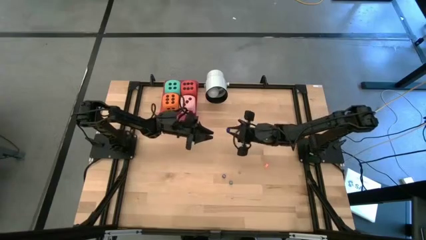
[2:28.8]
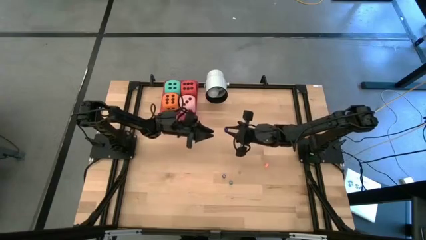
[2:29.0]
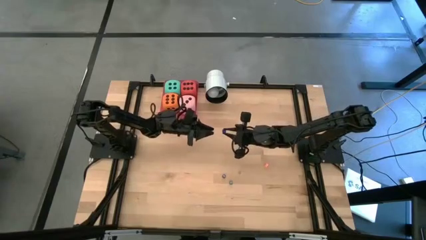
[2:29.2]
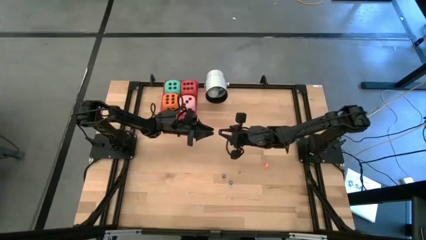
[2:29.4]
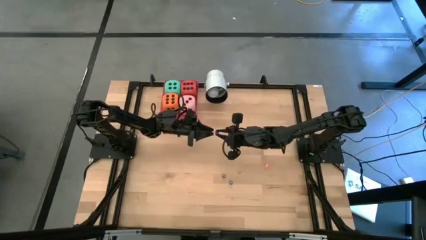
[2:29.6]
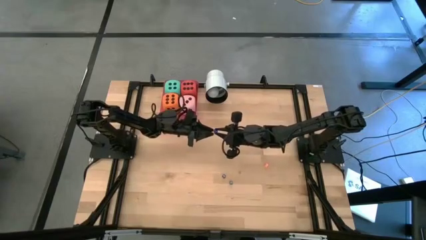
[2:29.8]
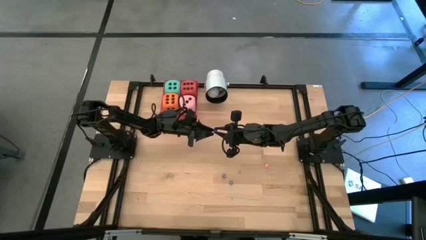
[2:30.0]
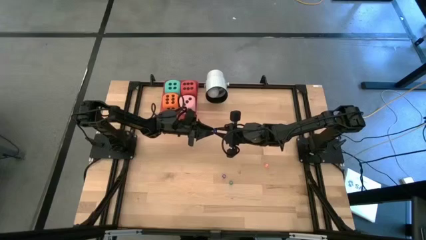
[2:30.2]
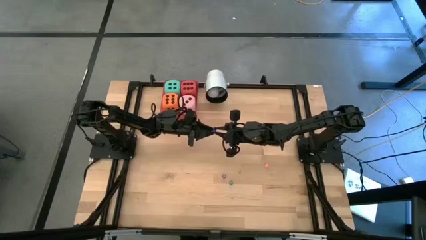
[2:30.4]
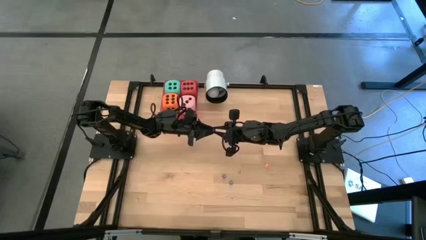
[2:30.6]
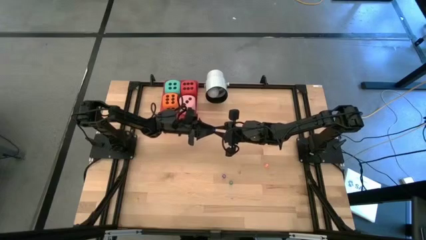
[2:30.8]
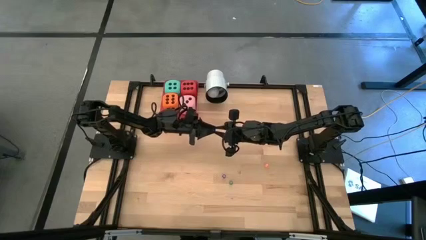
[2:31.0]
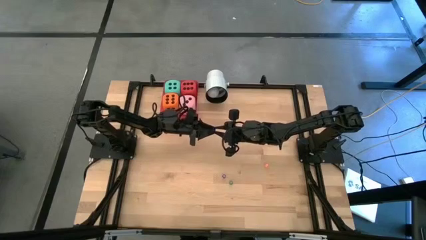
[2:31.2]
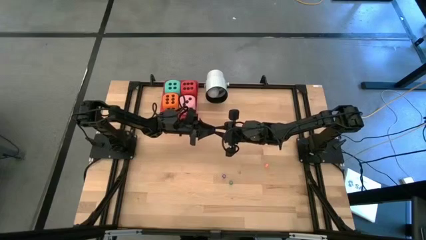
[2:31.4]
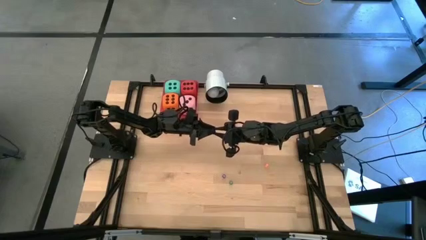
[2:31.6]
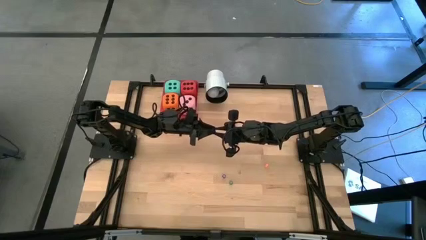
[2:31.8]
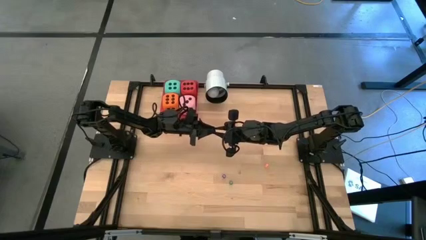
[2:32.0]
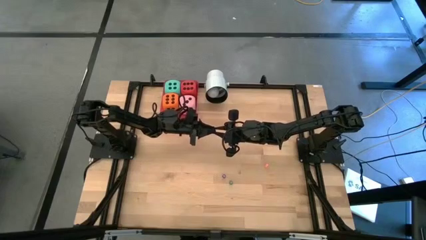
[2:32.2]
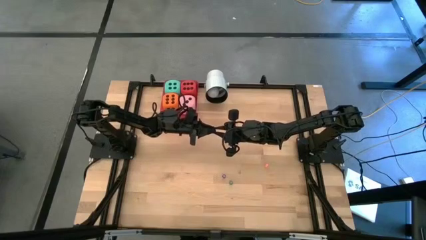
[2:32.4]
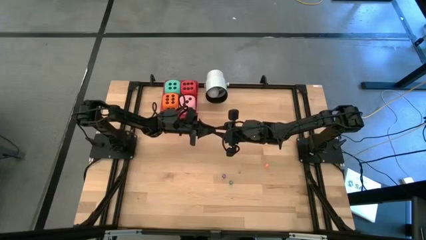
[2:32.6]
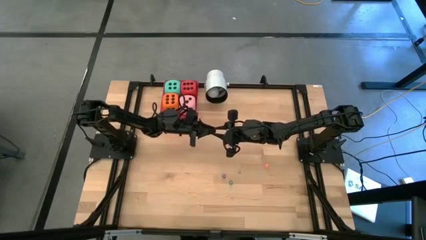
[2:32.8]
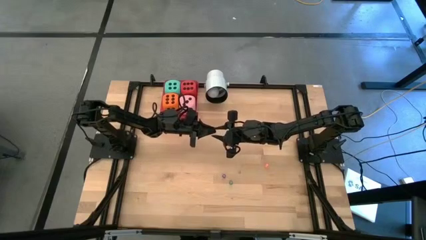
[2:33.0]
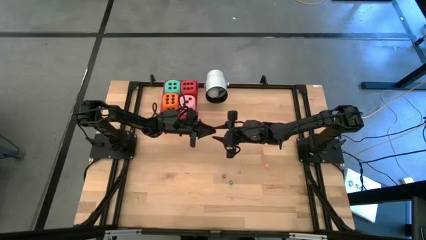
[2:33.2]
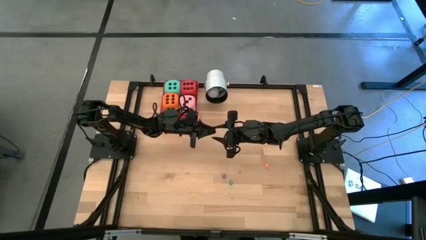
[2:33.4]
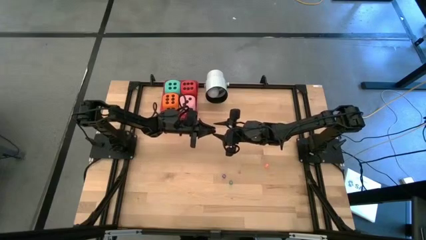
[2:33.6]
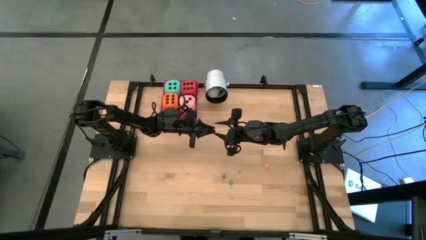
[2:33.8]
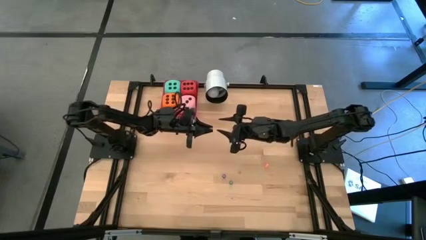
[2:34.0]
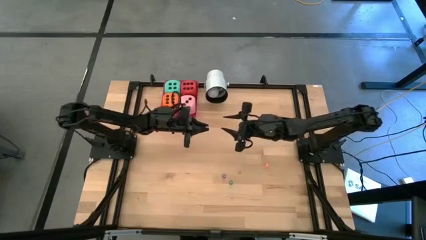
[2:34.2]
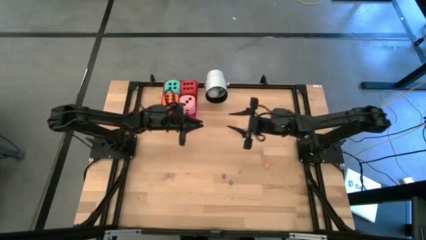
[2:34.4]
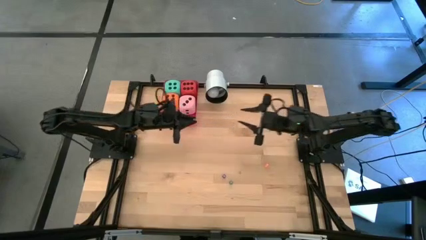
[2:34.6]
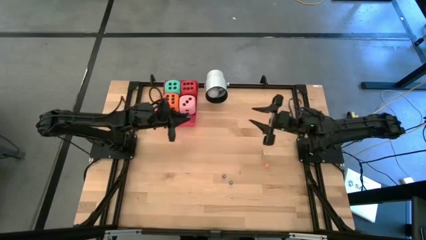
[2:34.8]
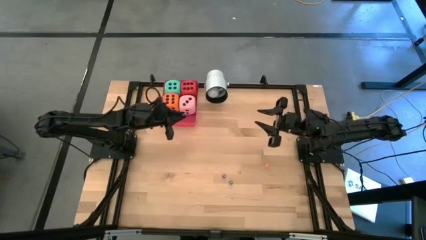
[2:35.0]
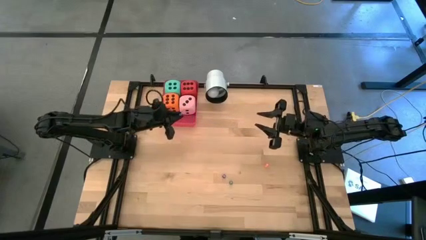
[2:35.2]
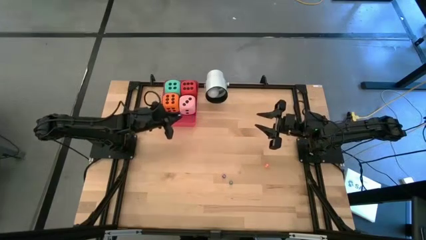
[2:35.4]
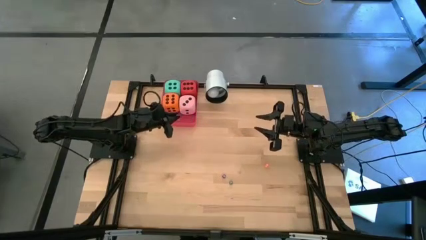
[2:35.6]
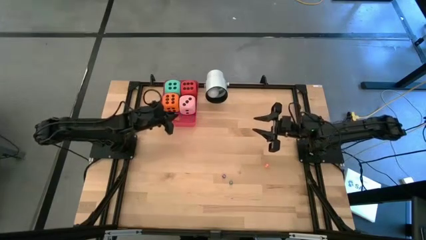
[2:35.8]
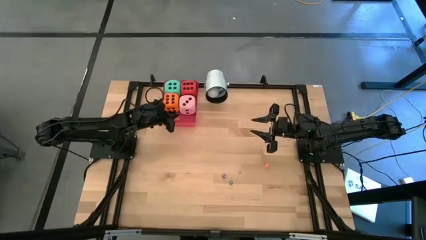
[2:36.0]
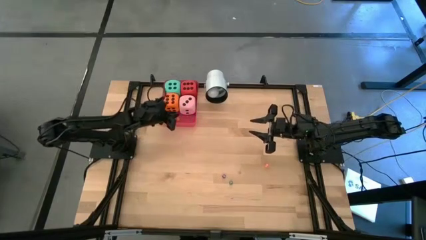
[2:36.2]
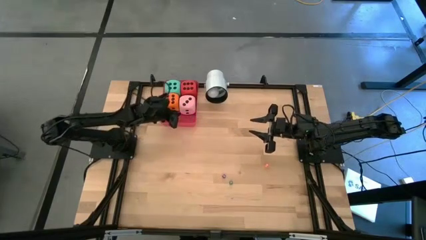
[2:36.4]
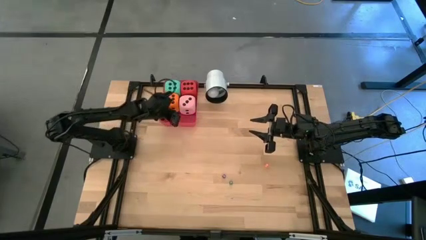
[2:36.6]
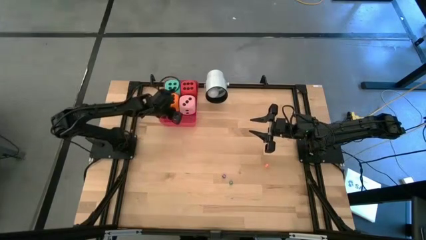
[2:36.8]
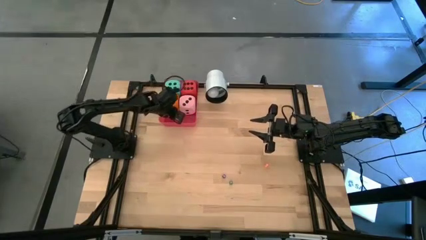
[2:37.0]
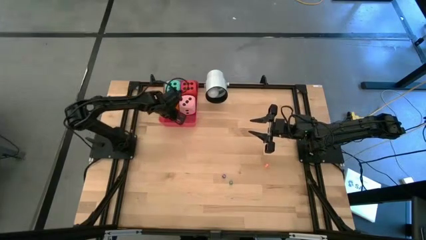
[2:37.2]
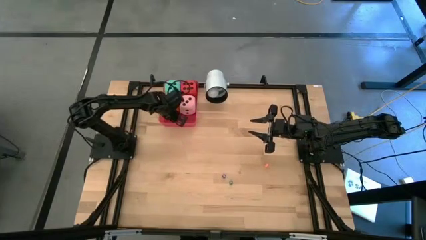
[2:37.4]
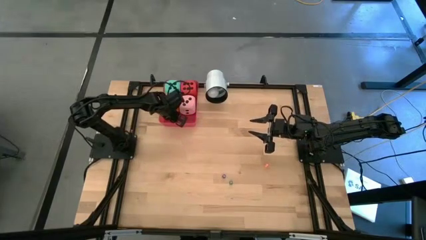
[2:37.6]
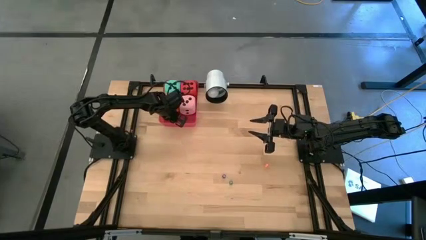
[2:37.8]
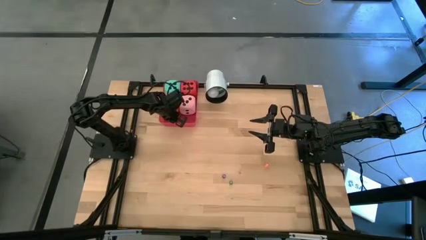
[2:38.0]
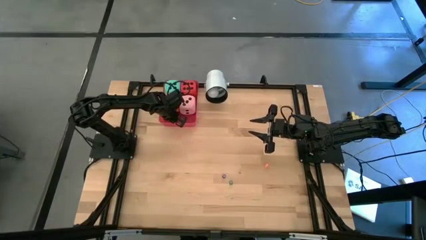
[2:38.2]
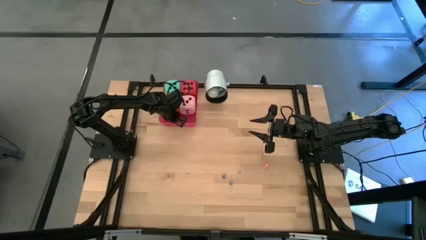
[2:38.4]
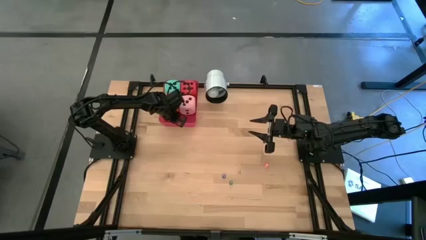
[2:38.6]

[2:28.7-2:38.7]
Task: Pick & Place Dice
Put the top small blue dice into the red bin

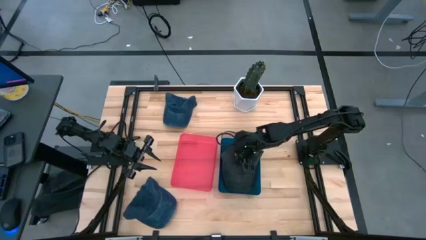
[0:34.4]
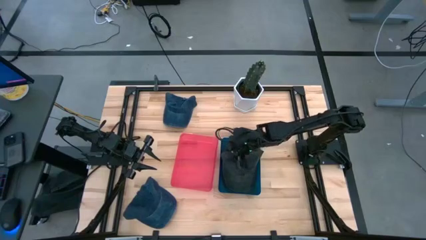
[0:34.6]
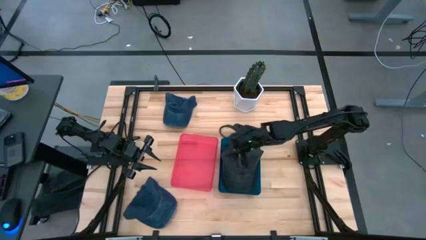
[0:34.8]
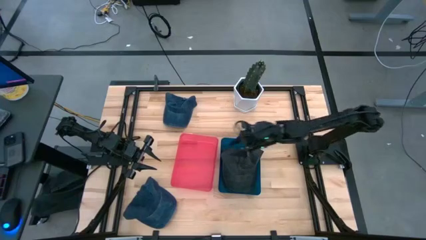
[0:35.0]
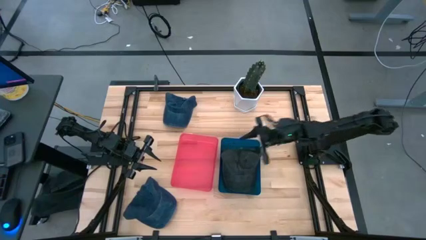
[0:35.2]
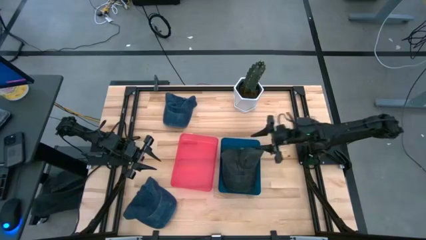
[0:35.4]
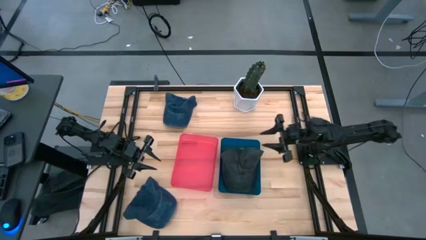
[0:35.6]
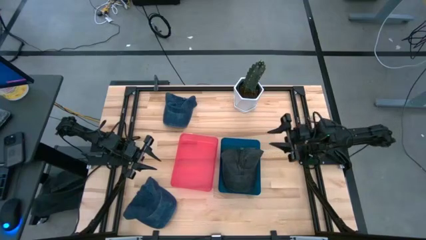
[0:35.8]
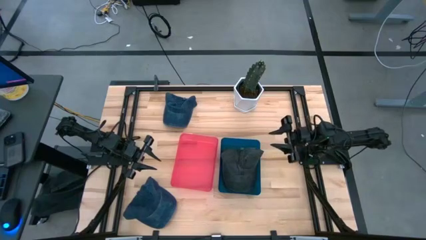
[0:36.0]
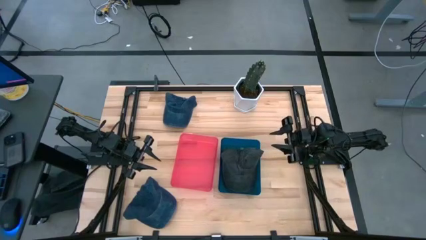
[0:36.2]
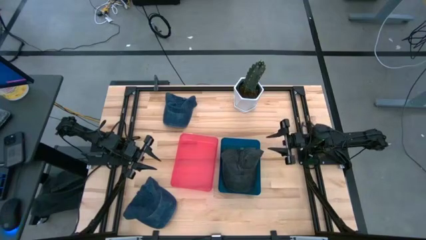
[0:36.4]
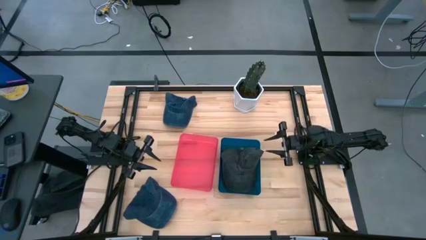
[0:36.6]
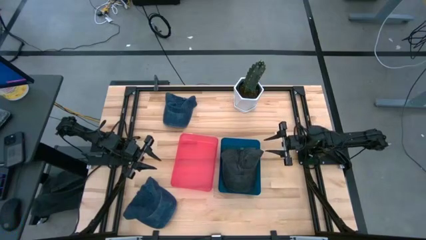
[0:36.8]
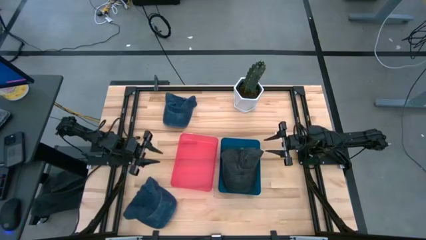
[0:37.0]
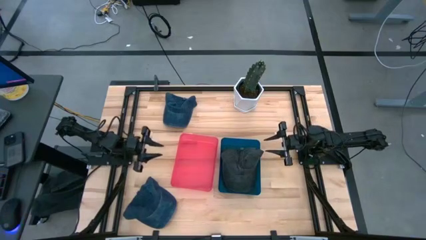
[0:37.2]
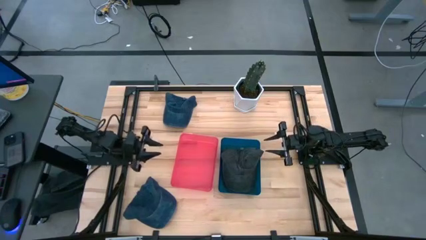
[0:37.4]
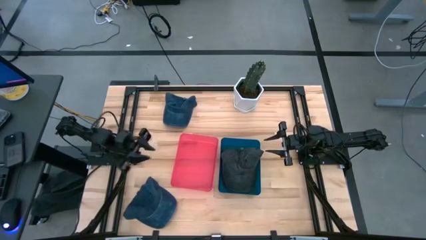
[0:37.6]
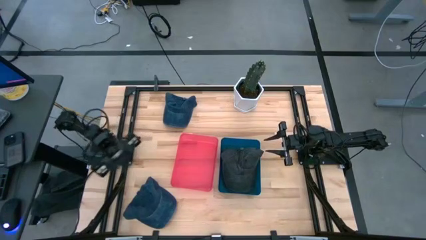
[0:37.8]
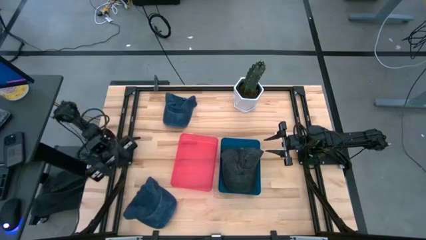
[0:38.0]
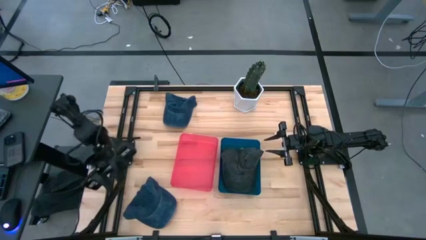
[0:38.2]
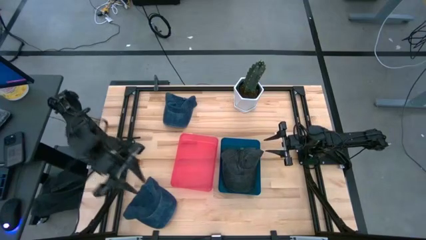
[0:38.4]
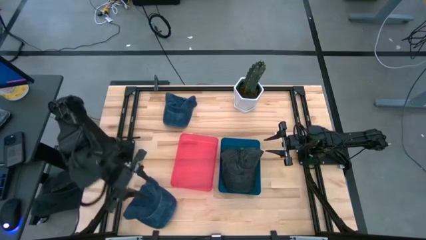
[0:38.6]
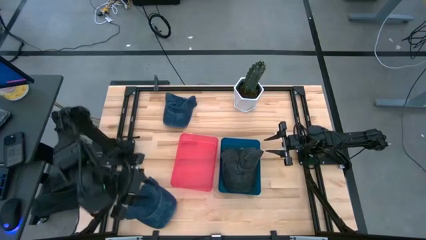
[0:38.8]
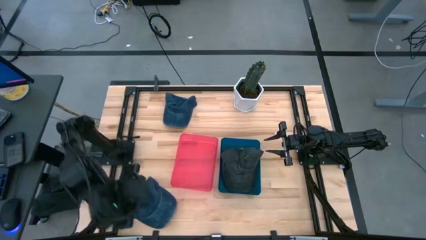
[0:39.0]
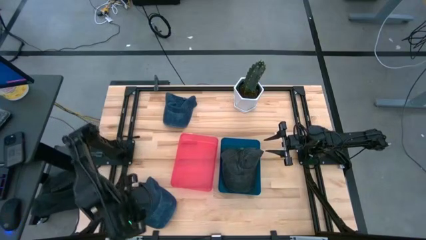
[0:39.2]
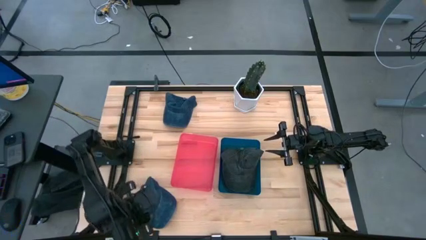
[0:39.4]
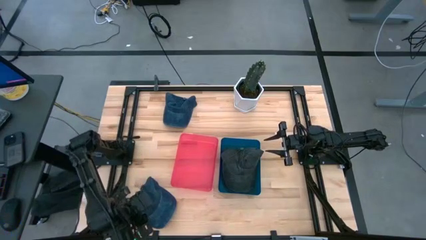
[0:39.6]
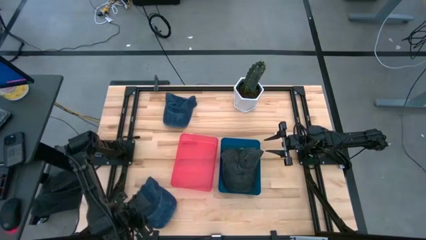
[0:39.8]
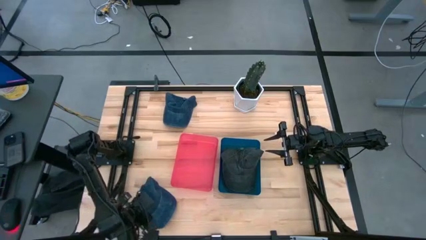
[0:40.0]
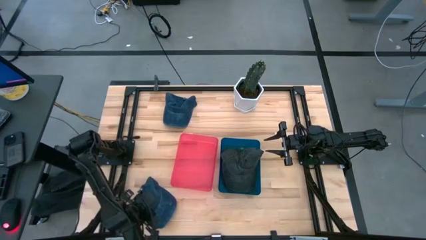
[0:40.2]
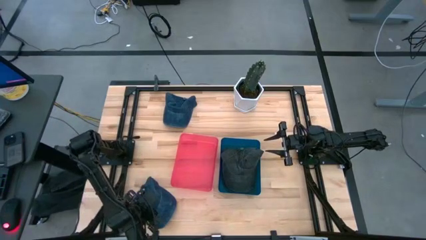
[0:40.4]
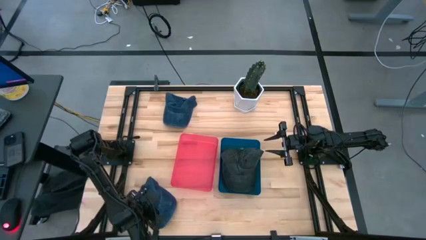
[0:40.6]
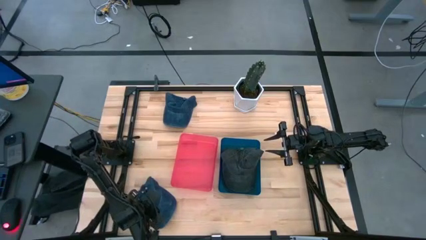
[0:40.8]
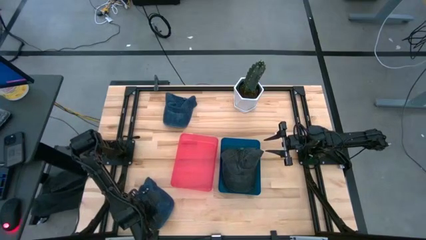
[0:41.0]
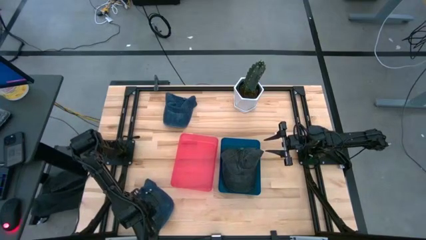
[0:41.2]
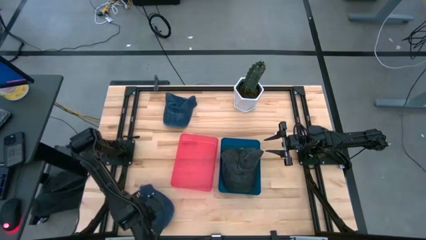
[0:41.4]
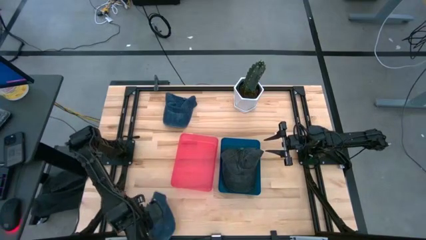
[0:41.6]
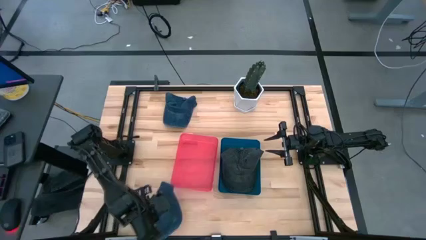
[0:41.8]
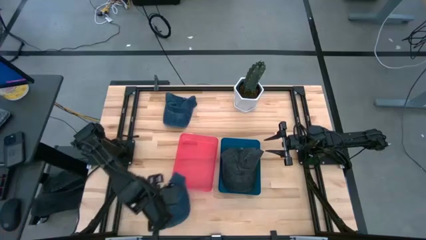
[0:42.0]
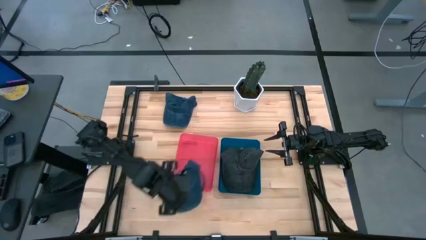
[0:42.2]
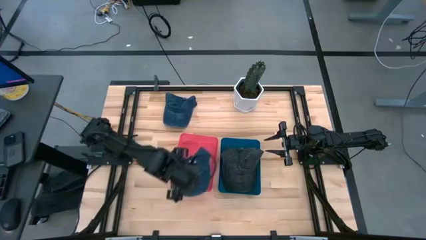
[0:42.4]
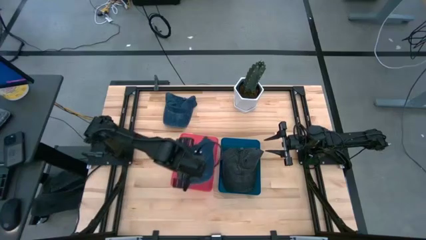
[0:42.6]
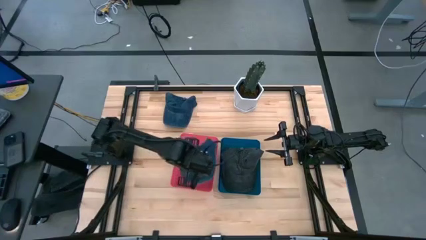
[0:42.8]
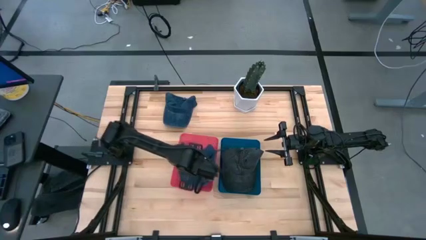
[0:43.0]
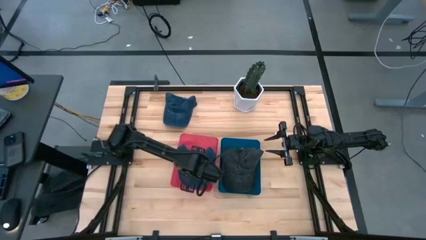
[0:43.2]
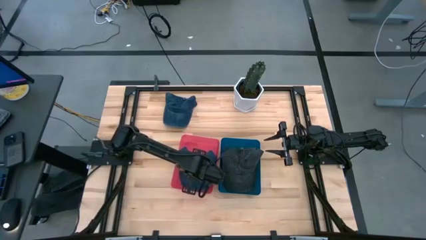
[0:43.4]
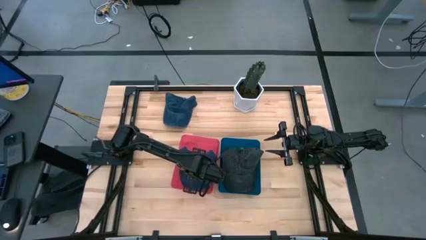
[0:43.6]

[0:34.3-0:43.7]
Task: Pick & Place hat
Put the bottom blue cap into the red bin
